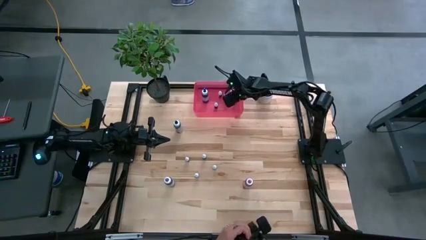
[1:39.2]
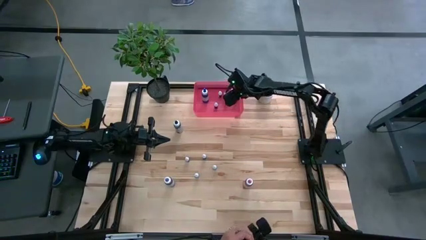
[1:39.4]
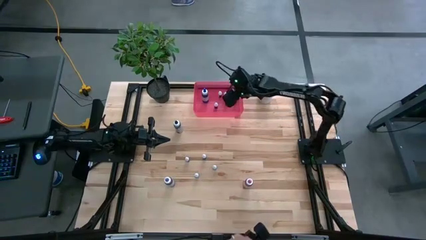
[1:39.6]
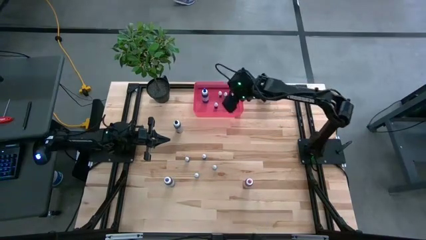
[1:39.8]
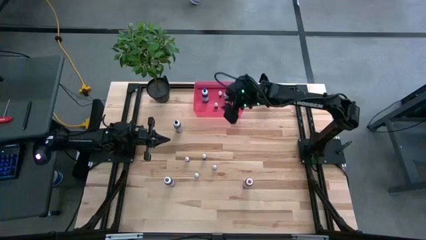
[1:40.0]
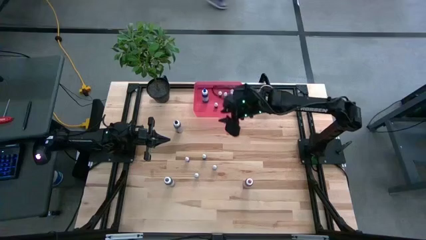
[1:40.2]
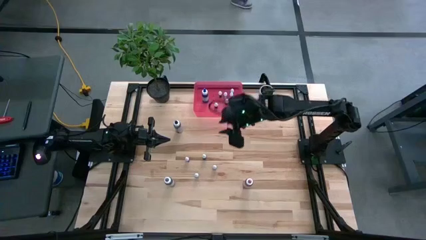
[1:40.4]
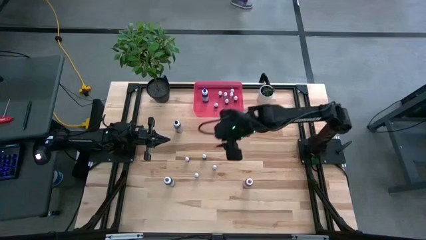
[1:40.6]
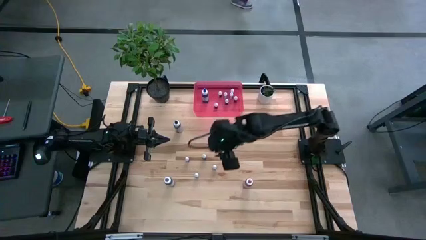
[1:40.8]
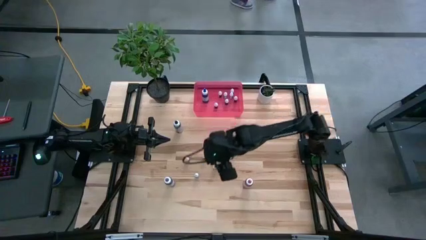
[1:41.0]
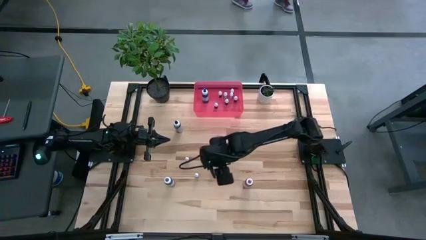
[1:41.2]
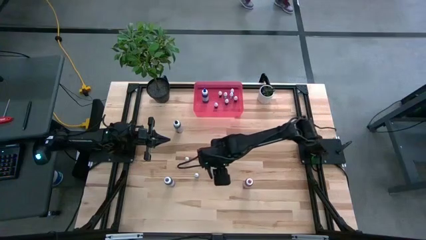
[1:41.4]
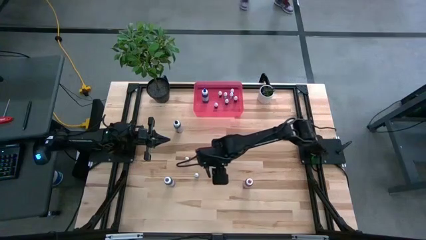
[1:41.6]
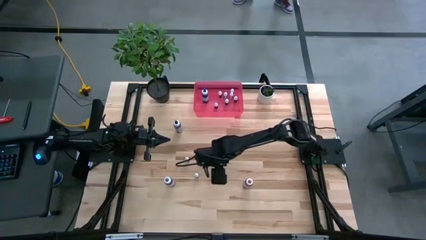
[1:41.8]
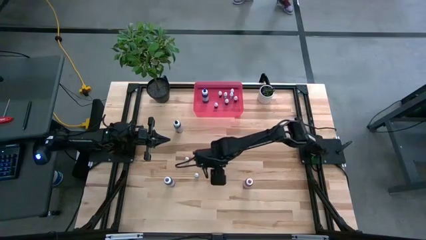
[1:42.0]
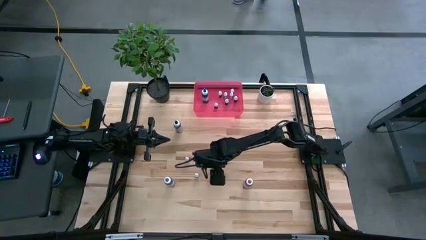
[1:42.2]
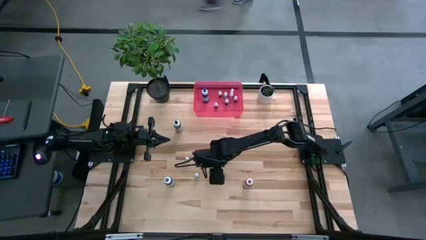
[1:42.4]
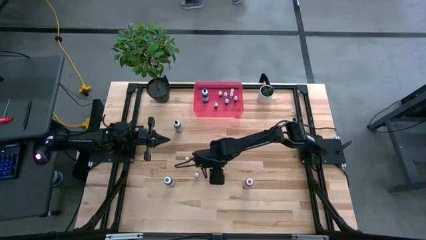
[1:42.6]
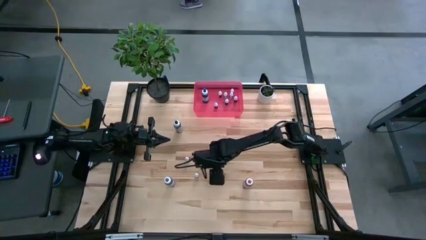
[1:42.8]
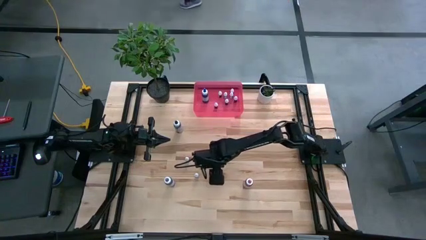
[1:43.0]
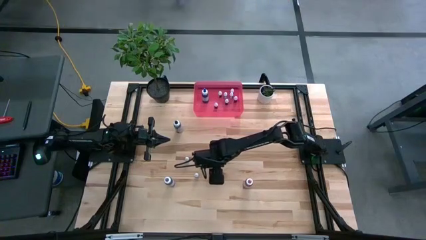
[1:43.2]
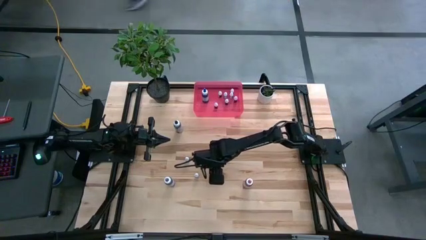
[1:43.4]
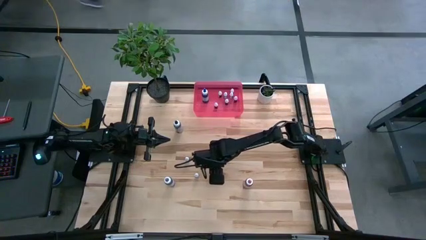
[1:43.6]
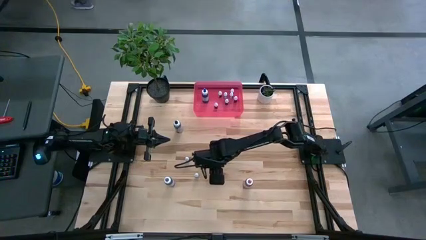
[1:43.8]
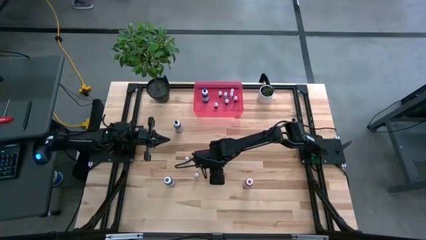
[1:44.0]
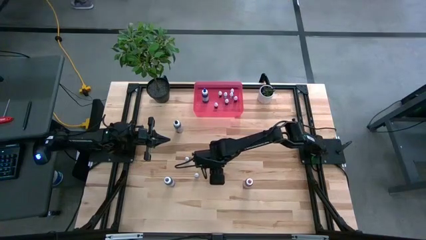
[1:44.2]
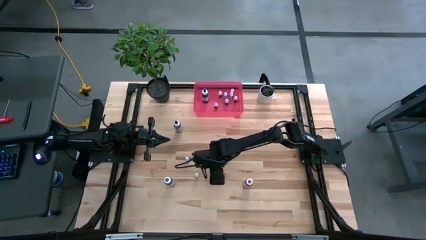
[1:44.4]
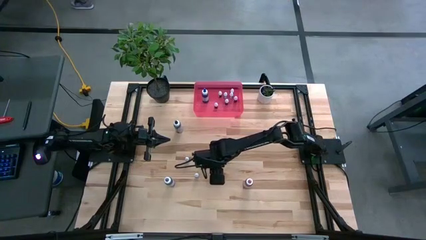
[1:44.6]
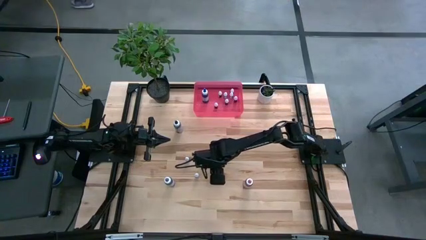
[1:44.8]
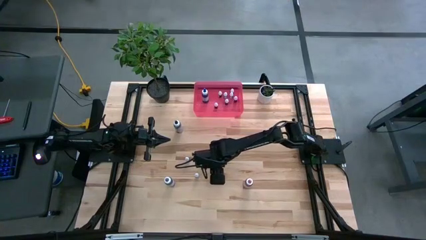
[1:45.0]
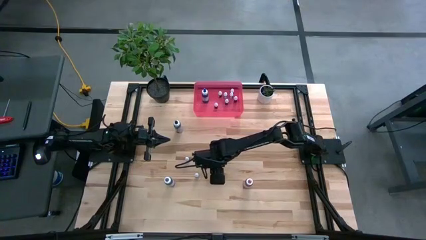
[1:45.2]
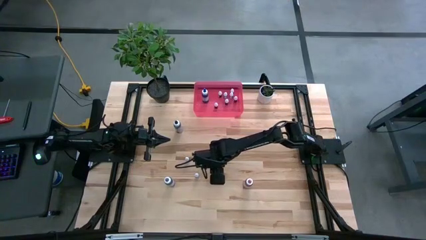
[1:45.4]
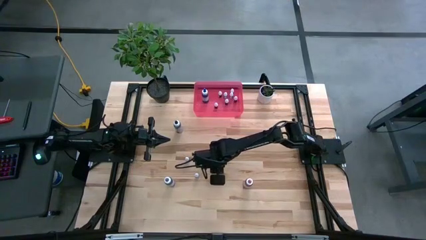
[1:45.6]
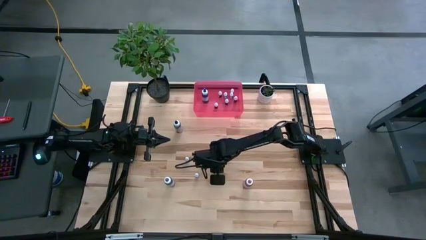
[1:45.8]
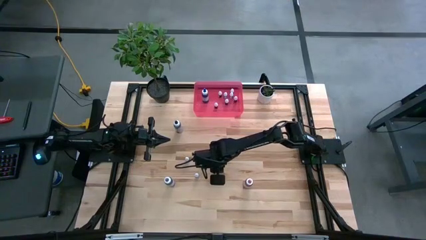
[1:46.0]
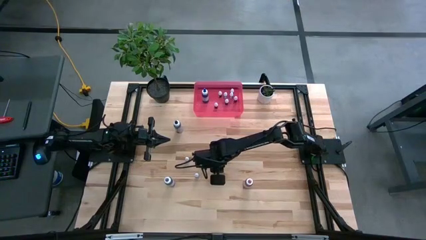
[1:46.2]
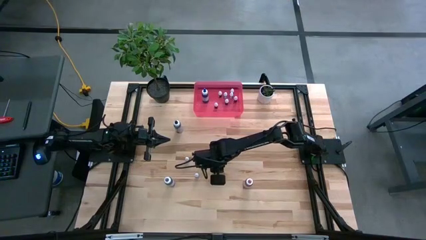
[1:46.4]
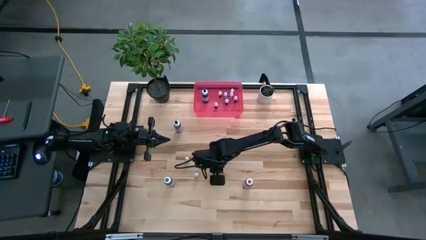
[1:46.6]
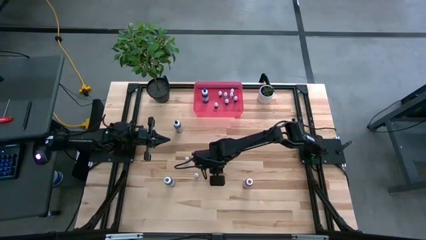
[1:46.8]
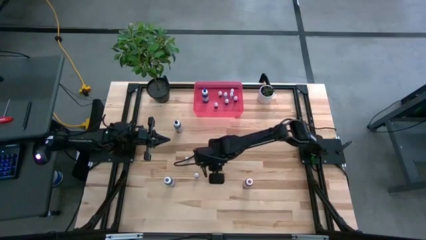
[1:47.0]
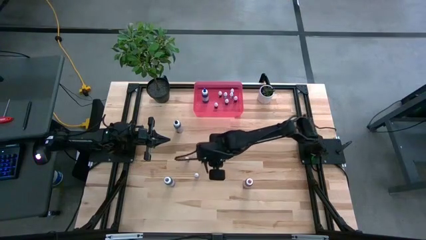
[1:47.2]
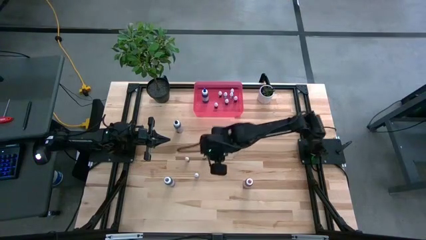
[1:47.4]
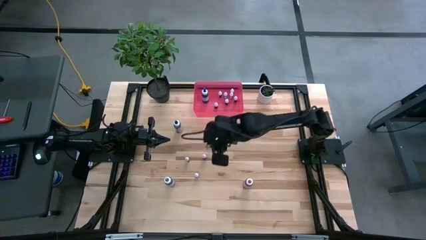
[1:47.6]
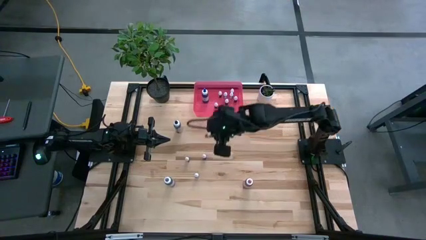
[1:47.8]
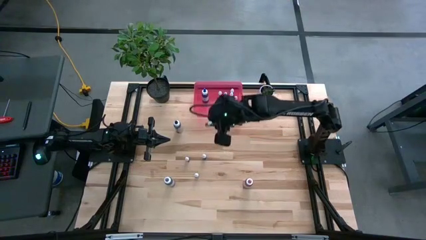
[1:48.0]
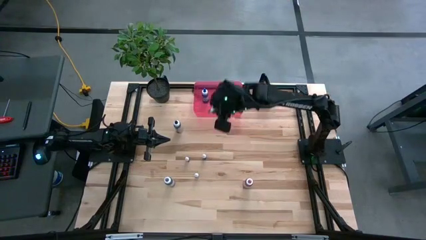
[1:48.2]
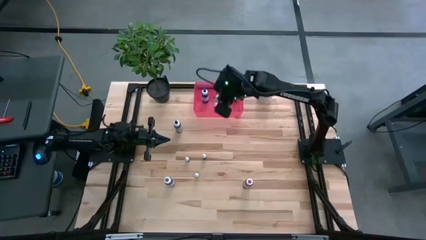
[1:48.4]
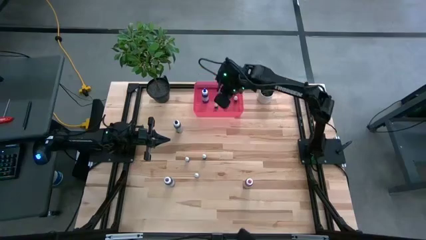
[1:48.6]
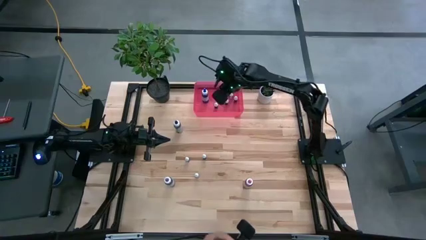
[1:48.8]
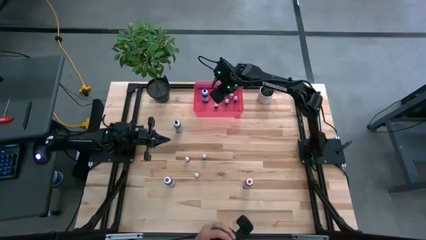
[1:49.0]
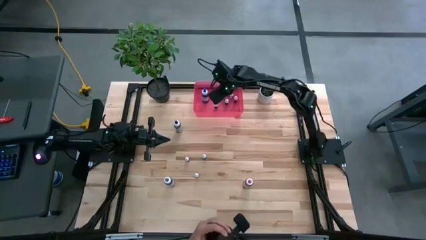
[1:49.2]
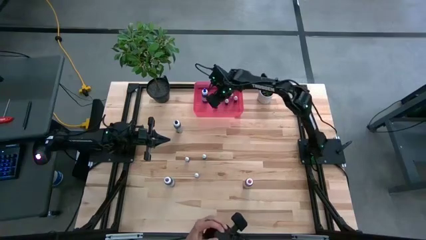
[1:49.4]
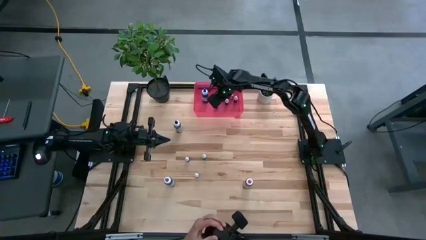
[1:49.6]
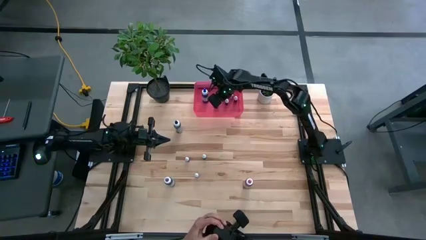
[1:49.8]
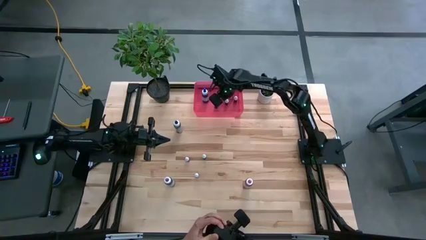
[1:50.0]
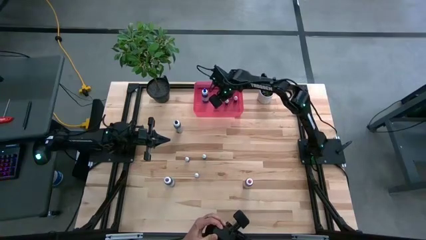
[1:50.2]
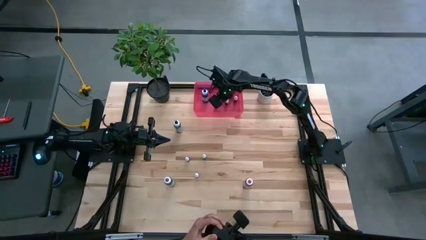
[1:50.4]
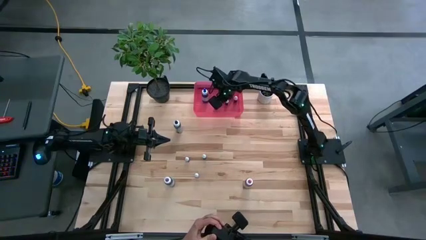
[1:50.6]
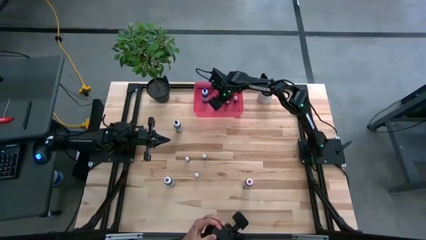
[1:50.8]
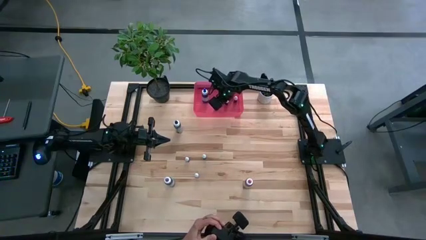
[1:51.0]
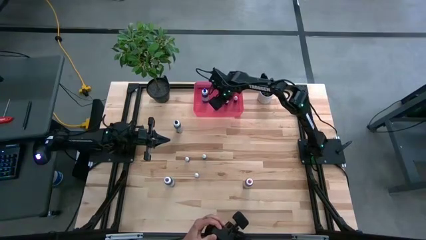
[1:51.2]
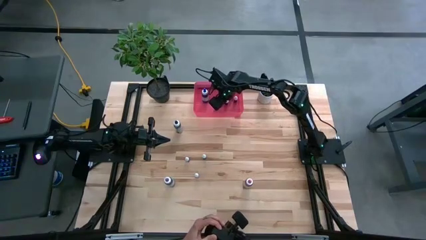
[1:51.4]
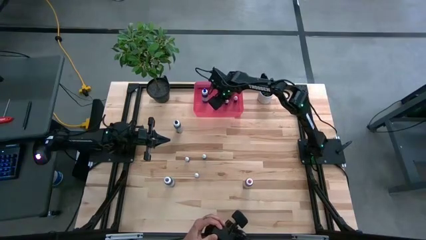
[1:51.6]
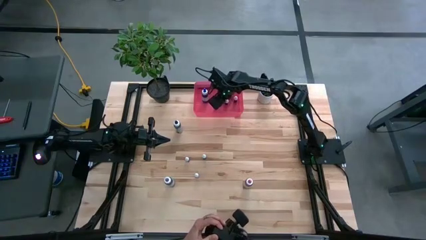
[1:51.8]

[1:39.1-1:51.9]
Task: Pick & Place food coloring
Put the small red food coloring bottle into the red bin

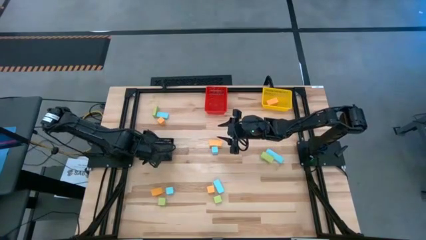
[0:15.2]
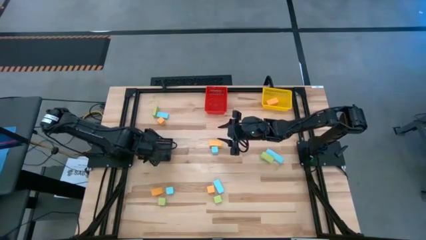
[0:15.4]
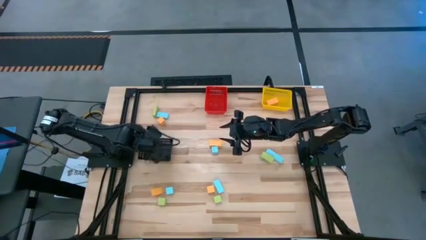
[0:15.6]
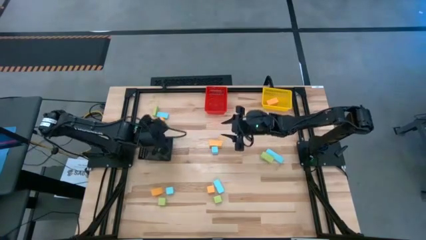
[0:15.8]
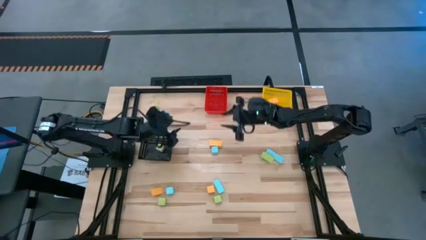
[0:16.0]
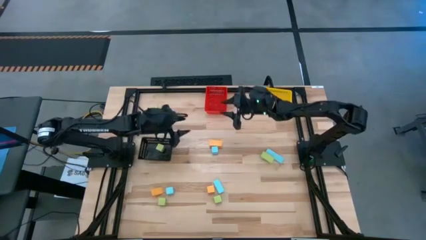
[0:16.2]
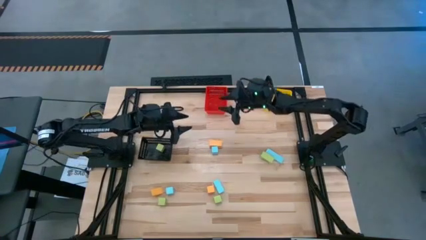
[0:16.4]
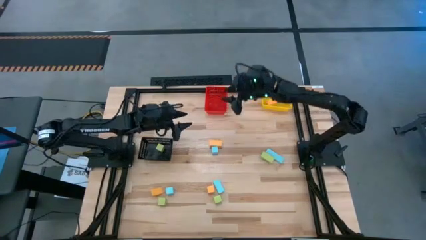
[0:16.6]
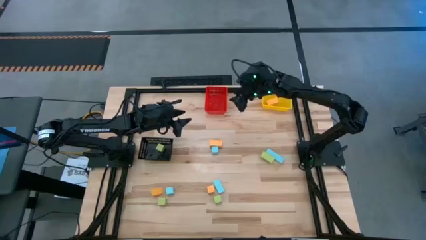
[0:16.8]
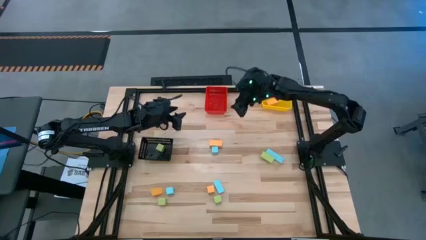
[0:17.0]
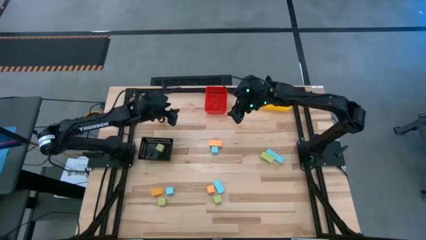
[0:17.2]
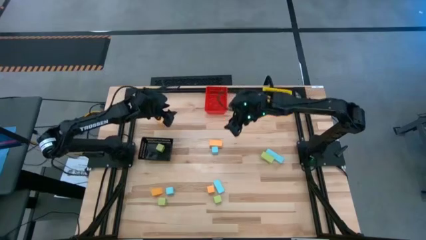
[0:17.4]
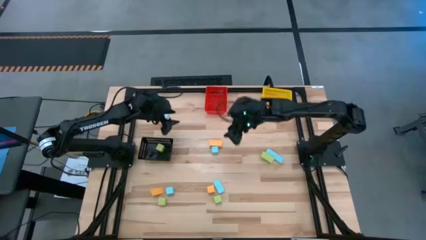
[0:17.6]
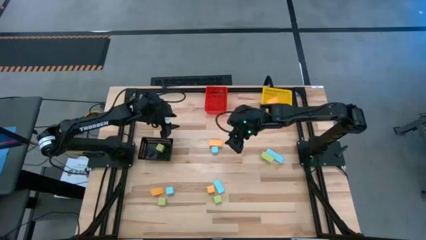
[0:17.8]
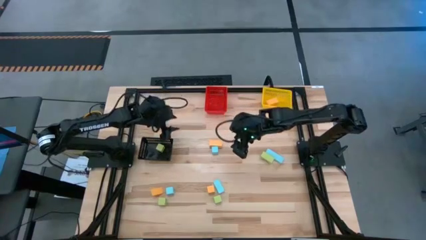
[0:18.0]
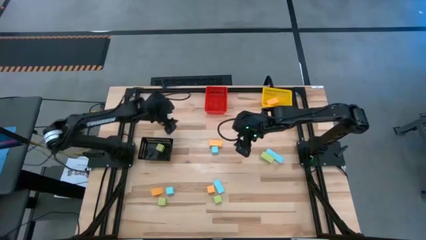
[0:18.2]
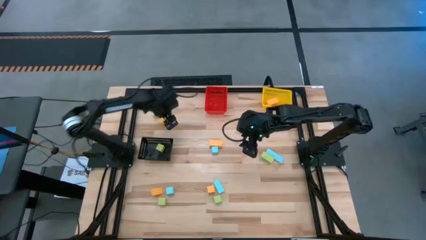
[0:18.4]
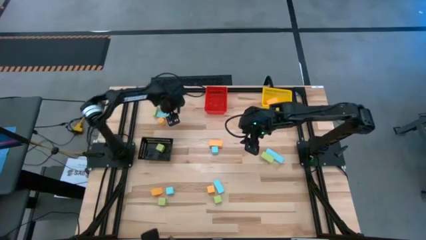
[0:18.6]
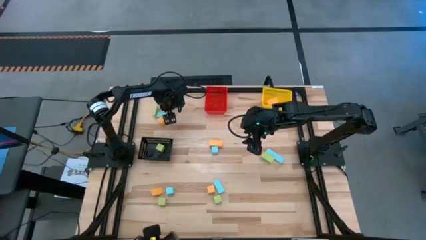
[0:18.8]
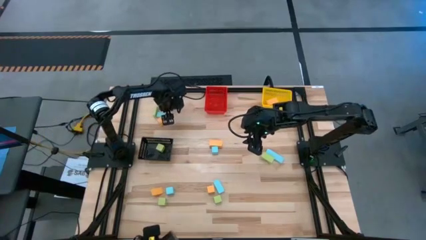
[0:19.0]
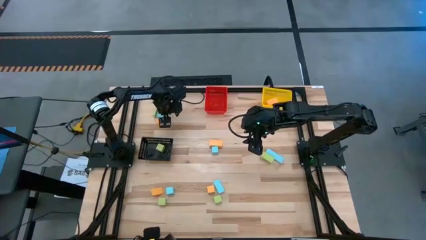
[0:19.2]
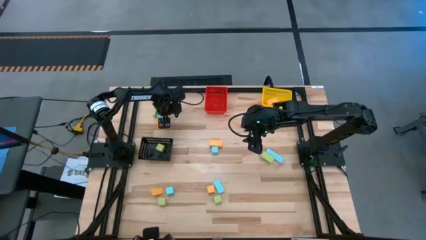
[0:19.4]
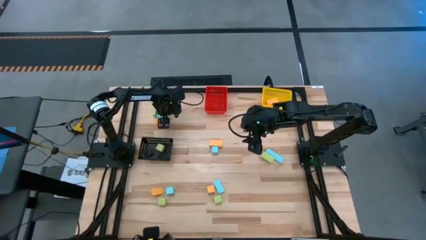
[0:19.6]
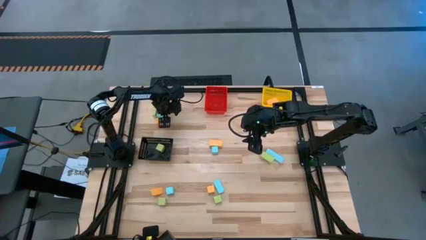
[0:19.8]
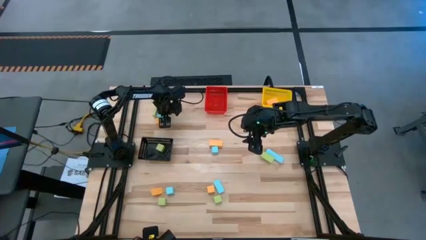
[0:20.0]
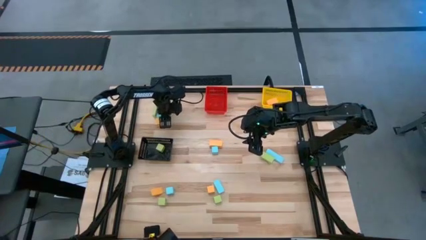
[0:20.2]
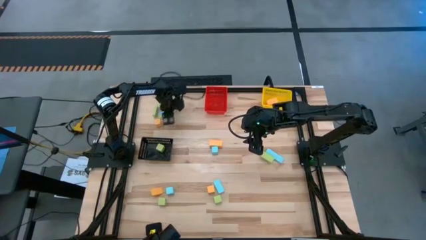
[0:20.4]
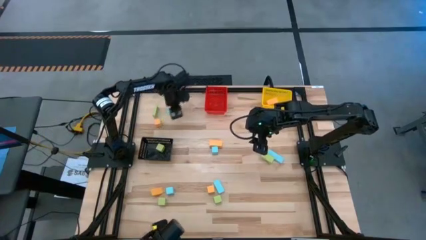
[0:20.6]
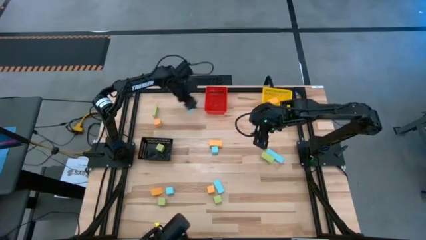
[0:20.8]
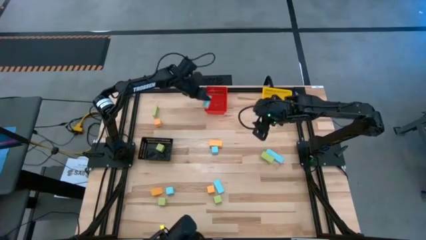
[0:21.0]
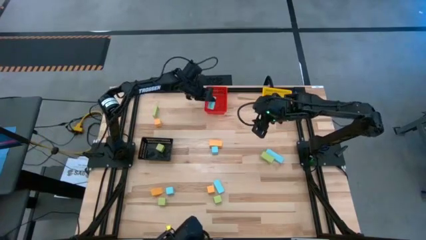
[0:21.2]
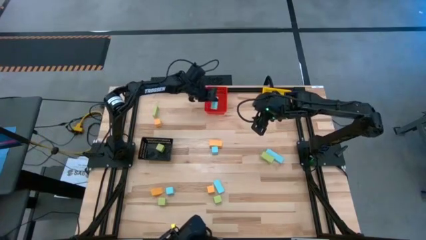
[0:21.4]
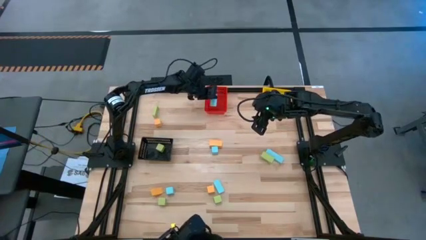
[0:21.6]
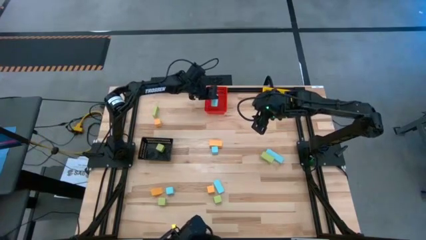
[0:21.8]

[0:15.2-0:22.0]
Task: Sort & place blocks by color
Put the blue block into the red bin
